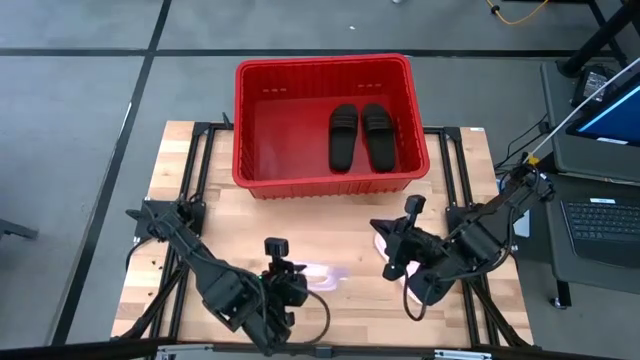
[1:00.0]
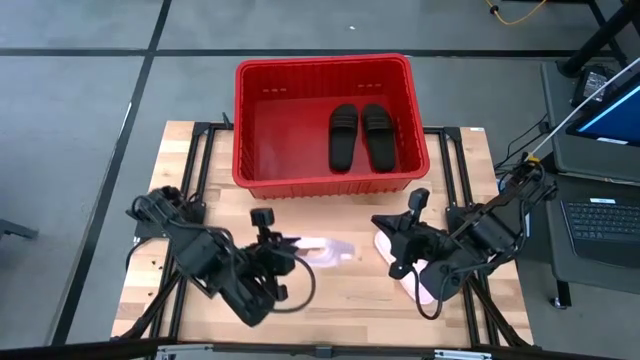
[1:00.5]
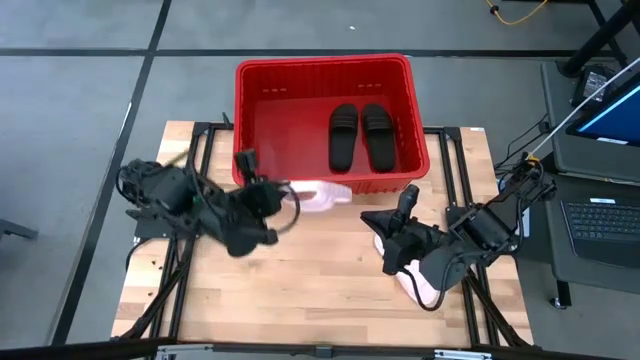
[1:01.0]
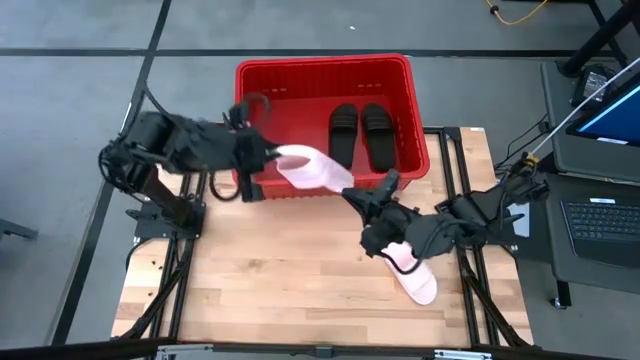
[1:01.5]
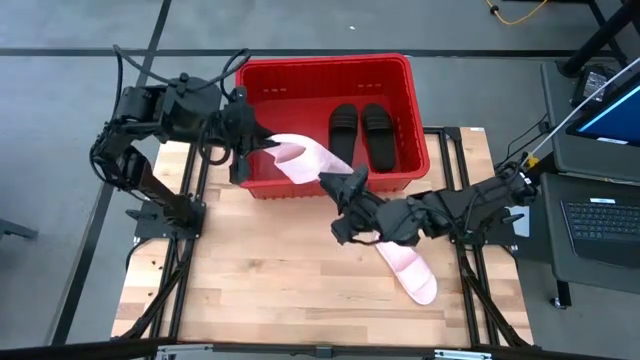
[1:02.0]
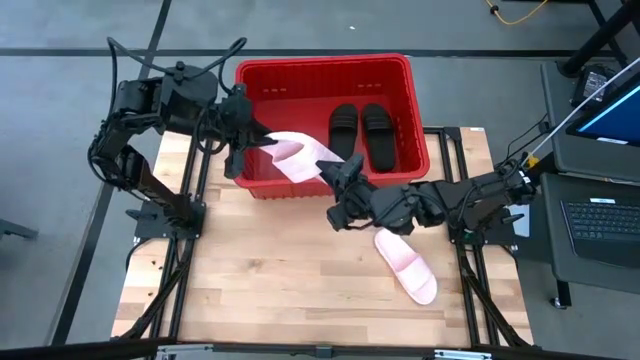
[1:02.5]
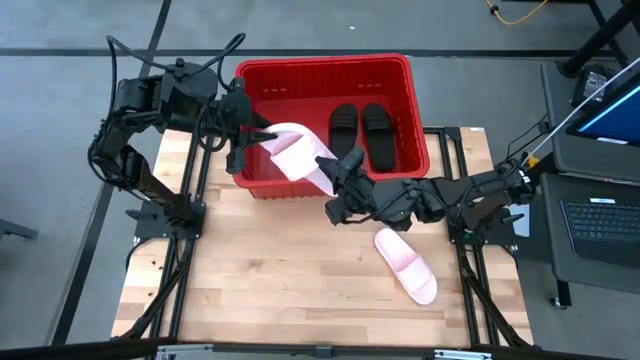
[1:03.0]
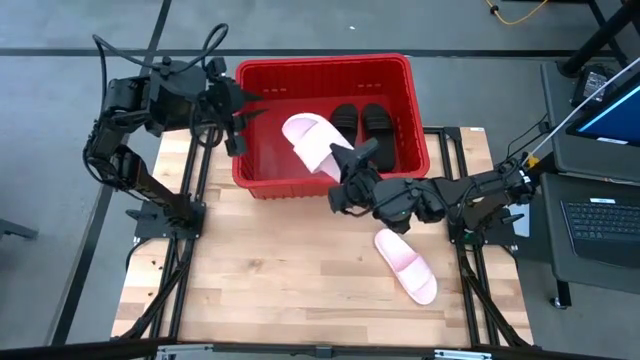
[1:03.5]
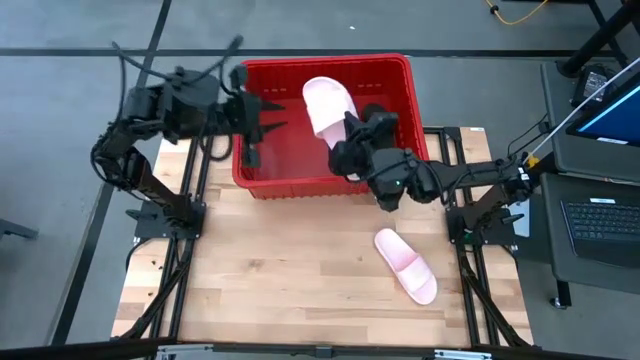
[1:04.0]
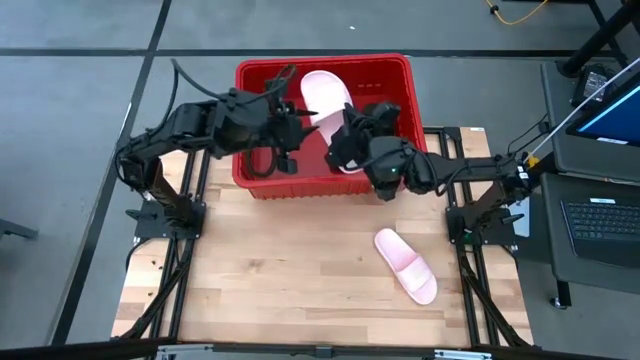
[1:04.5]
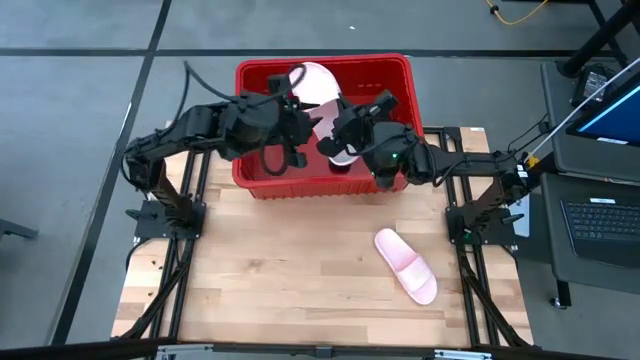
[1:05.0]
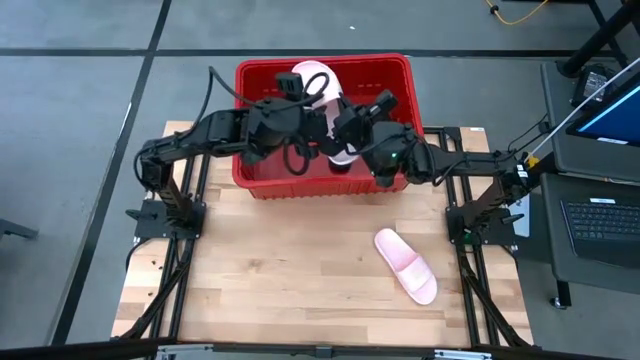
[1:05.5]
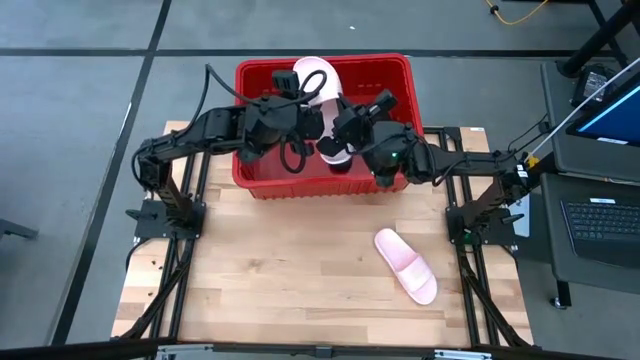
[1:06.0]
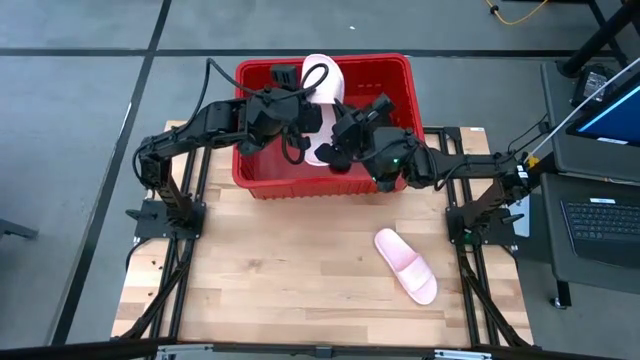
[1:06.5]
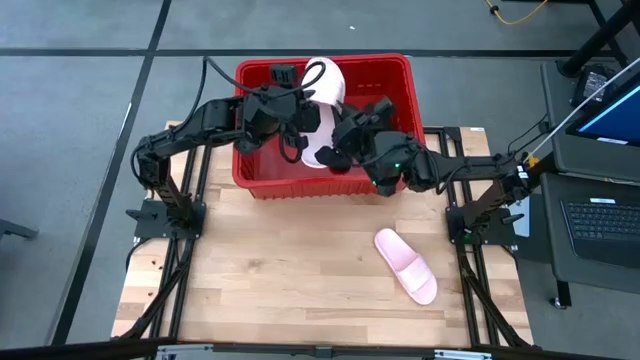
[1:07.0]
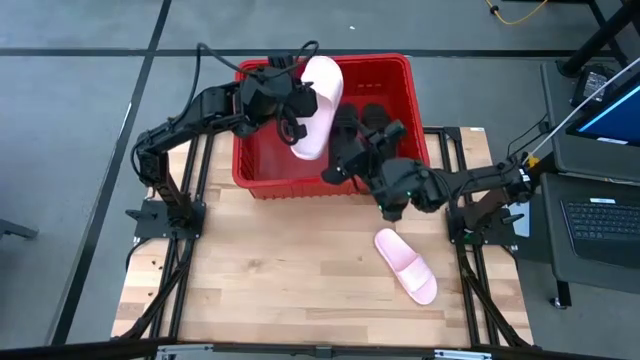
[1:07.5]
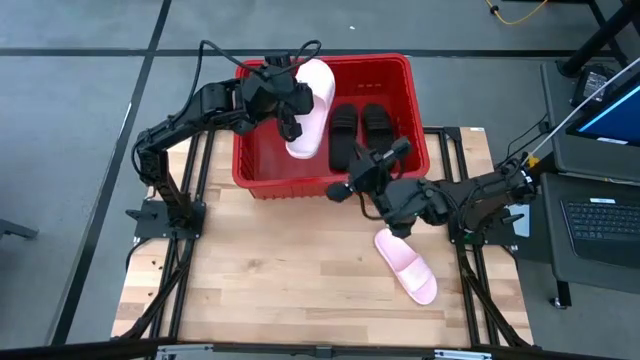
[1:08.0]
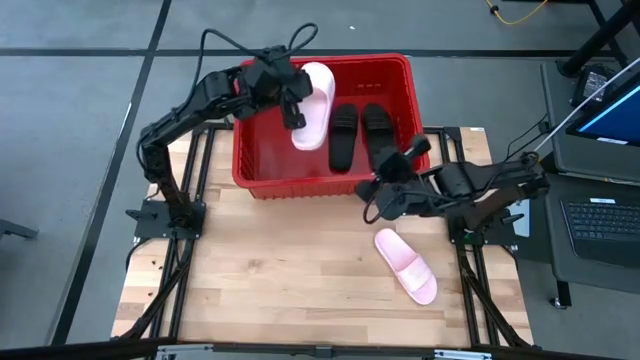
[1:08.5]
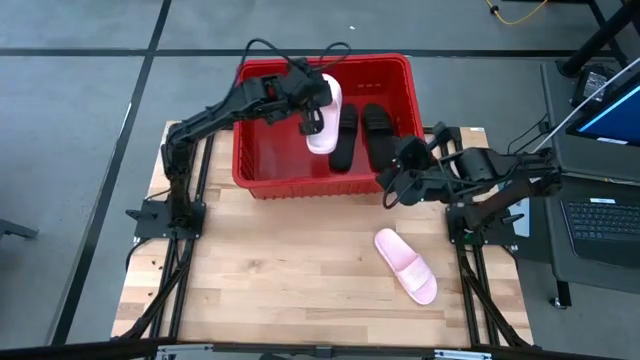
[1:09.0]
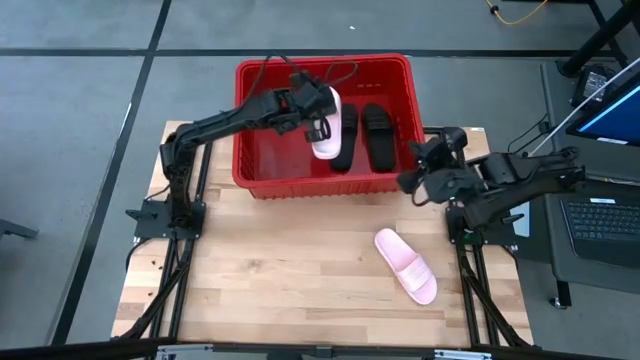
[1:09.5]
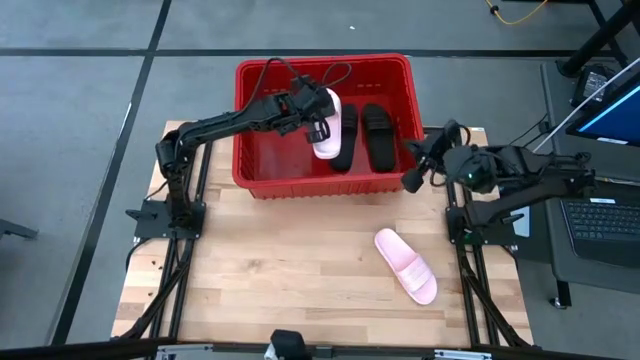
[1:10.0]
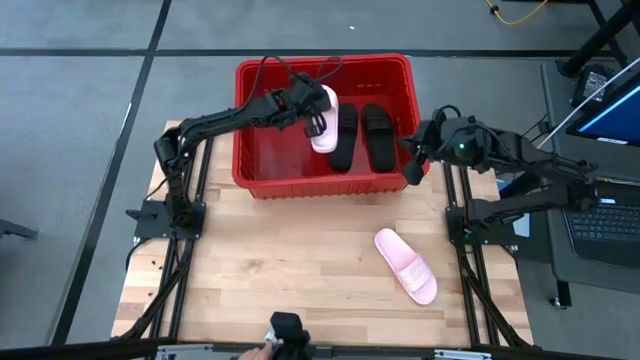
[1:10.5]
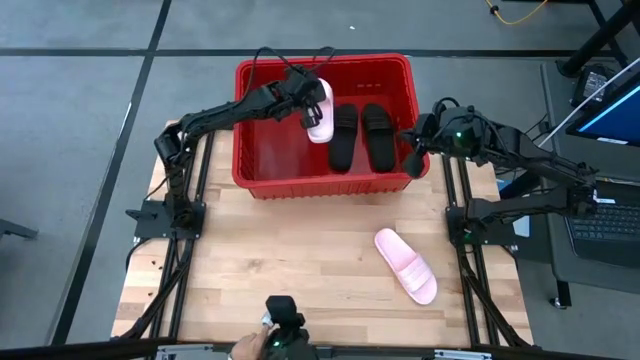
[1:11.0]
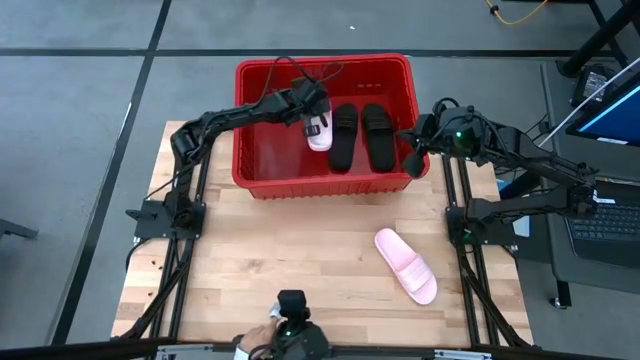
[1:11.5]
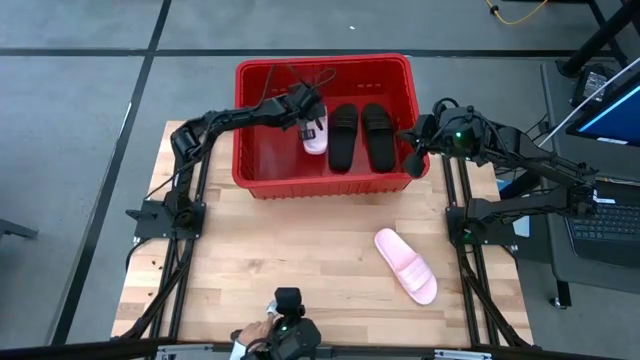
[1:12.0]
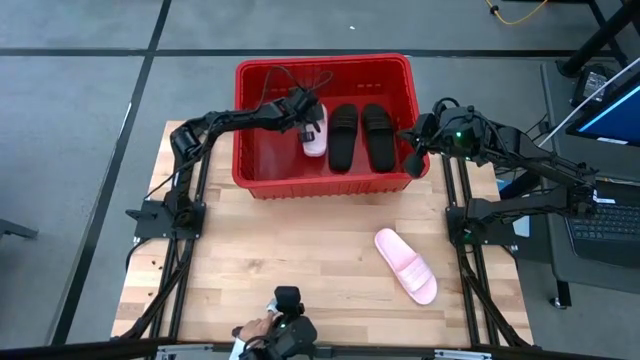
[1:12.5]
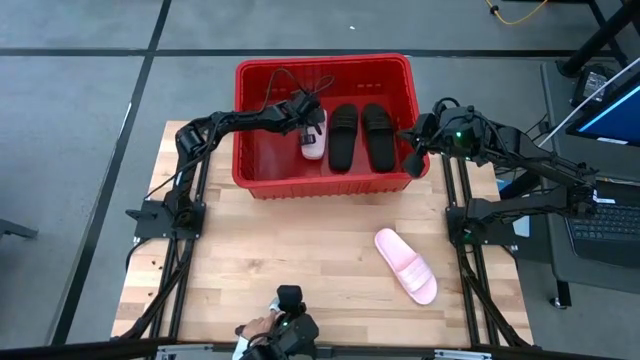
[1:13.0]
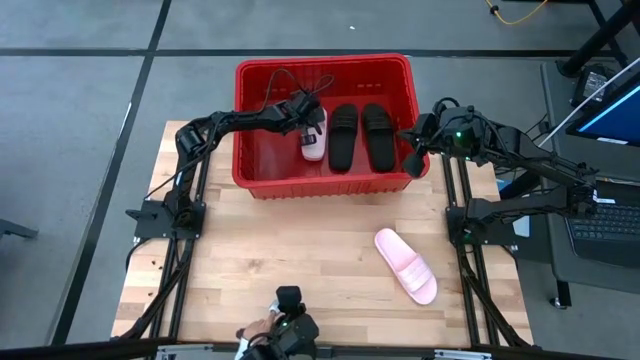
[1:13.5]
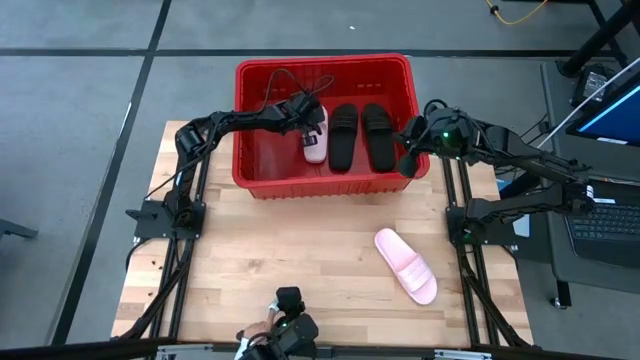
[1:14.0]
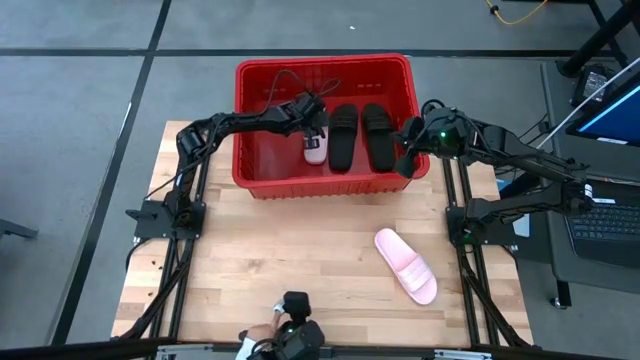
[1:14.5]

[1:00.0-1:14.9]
Task: Pick and place slides into bin
Put the left pink slide into the bin

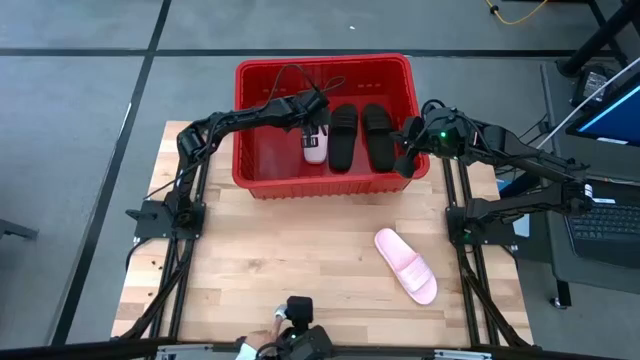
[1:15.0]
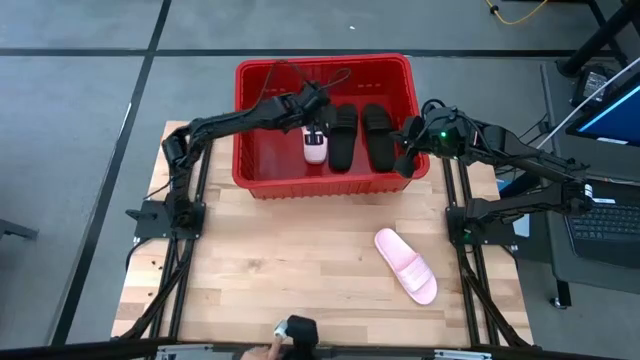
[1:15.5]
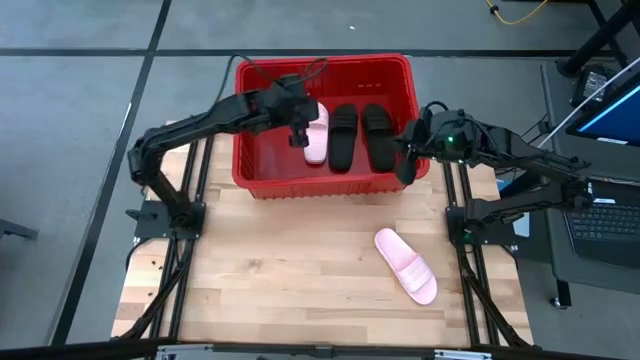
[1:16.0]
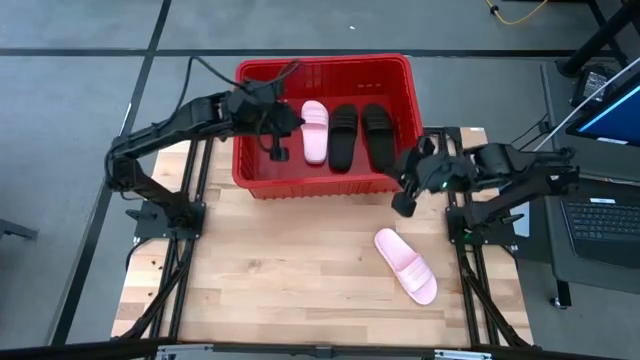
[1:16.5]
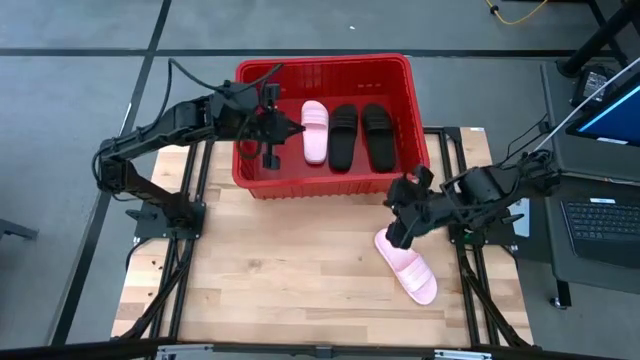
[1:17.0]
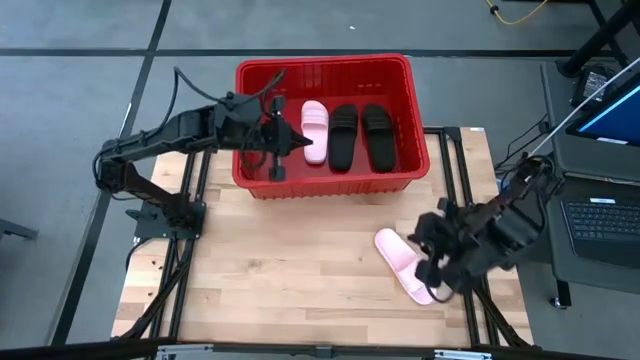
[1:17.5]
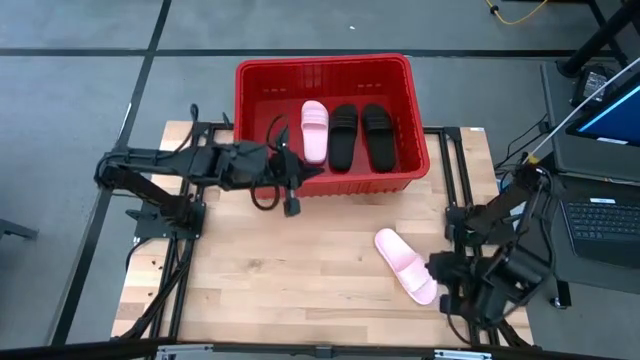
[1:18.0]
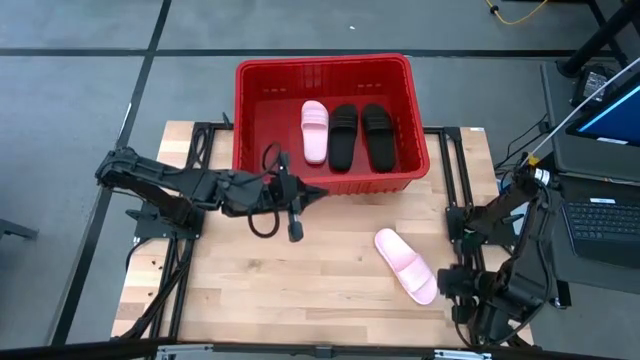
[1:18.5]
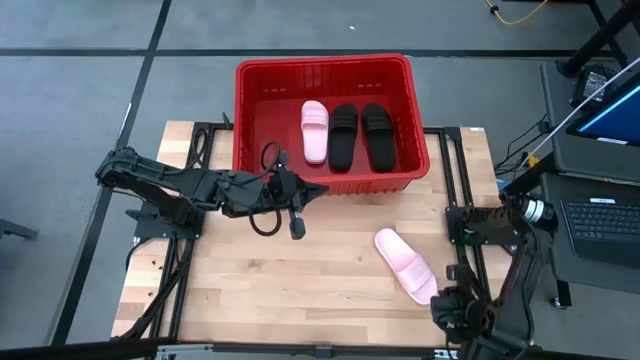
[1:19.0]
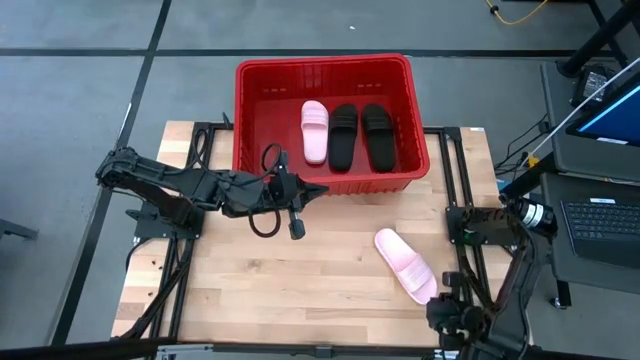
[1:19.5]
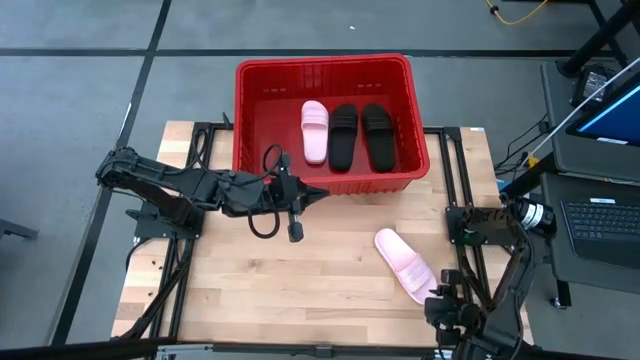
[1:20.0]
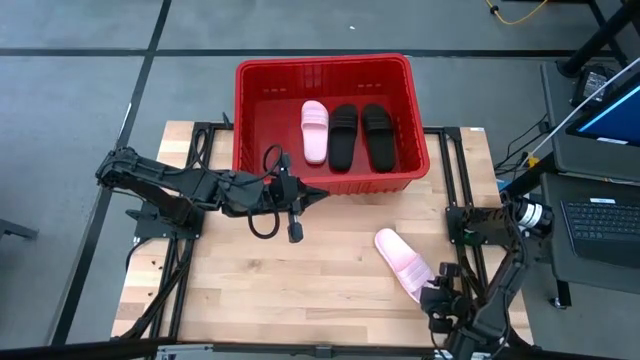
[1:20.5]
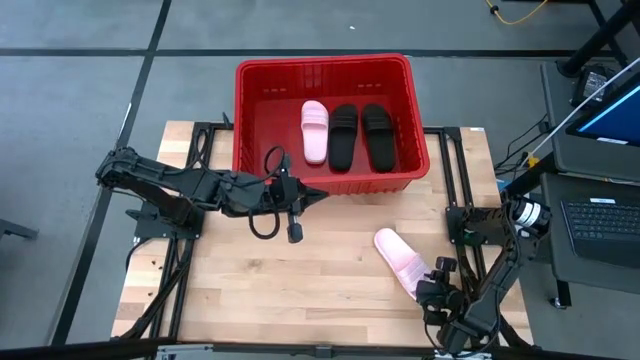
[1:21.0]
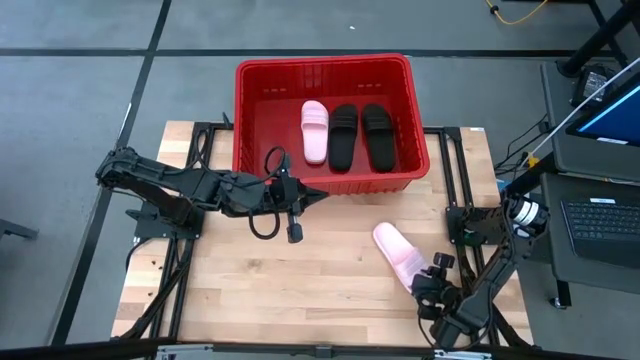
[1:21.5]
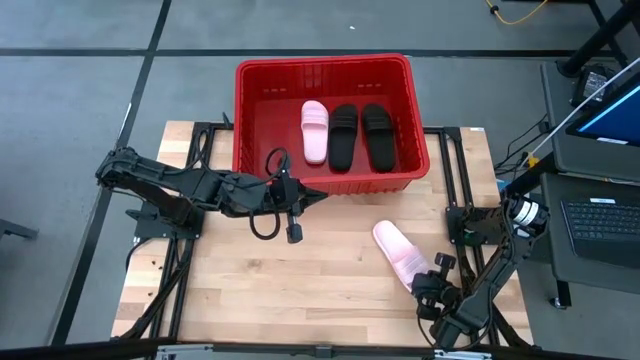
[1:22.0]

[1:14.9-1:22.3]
Put the pink slide into the bin
